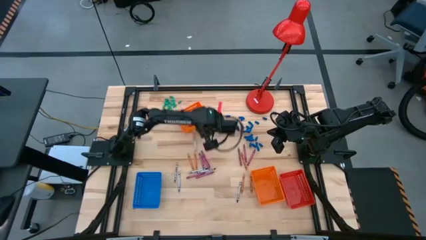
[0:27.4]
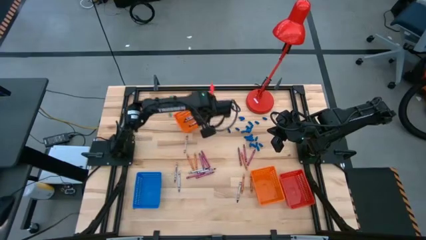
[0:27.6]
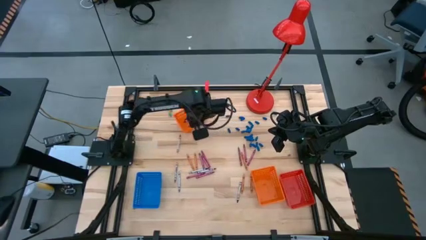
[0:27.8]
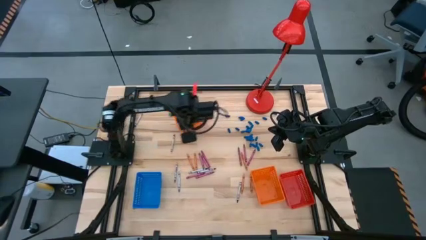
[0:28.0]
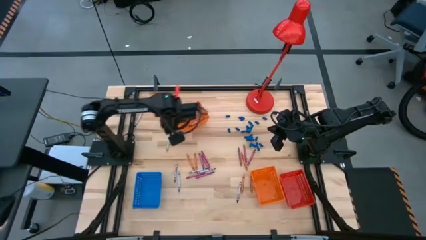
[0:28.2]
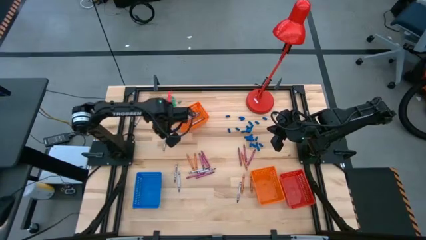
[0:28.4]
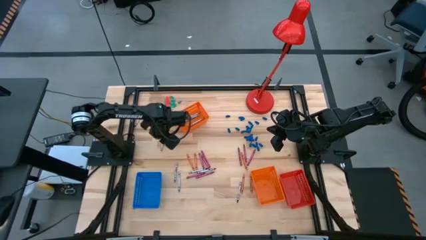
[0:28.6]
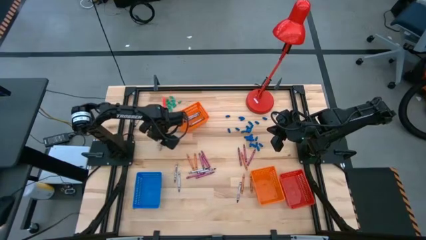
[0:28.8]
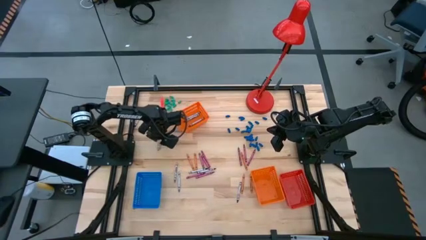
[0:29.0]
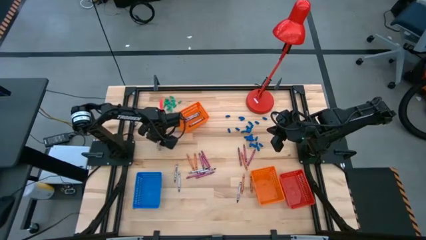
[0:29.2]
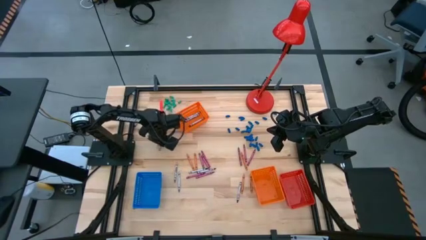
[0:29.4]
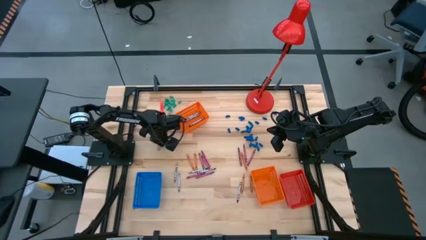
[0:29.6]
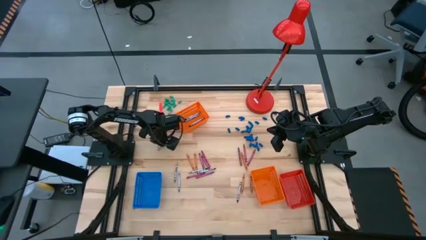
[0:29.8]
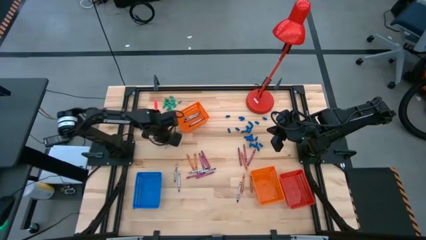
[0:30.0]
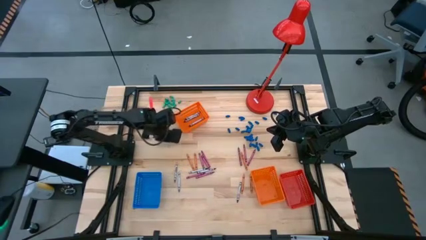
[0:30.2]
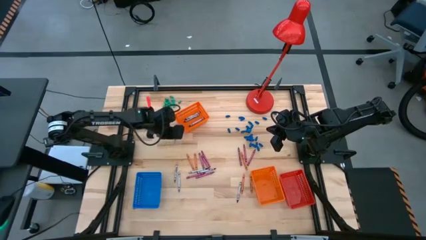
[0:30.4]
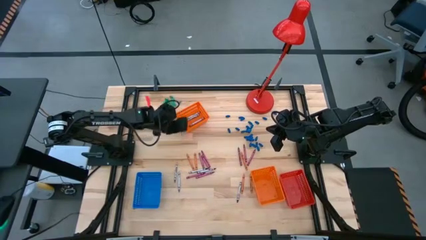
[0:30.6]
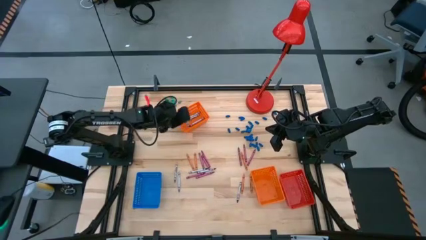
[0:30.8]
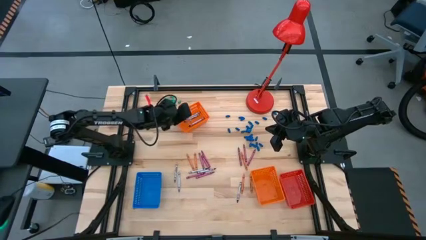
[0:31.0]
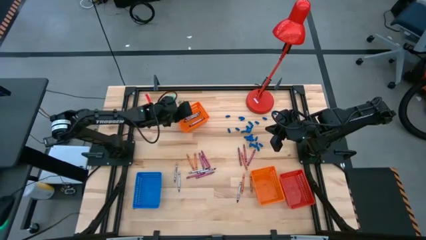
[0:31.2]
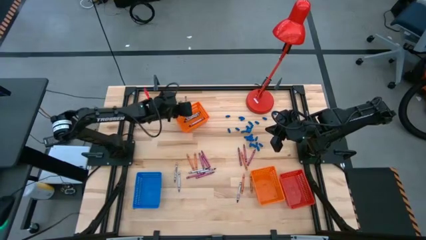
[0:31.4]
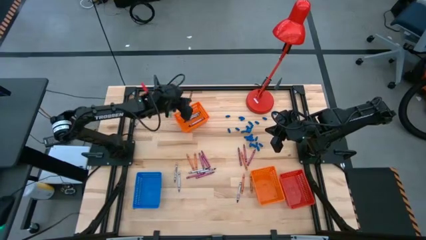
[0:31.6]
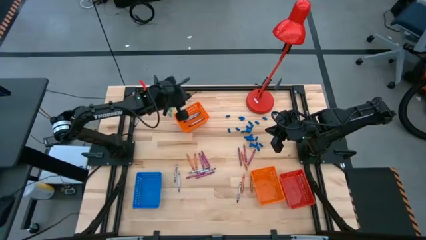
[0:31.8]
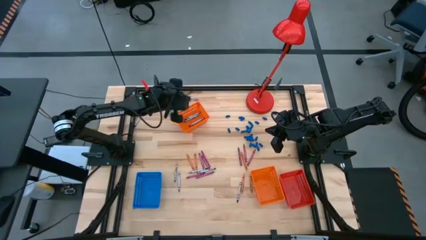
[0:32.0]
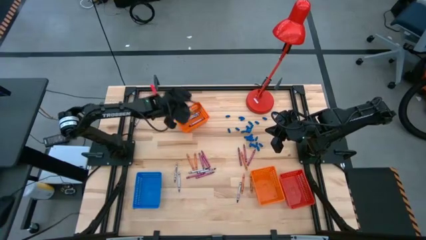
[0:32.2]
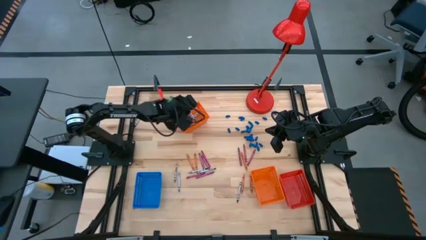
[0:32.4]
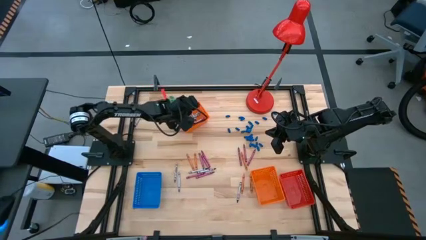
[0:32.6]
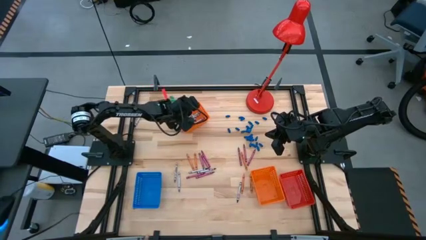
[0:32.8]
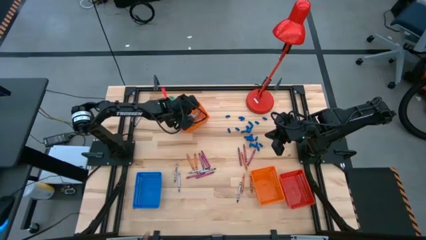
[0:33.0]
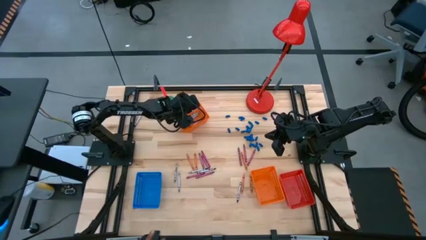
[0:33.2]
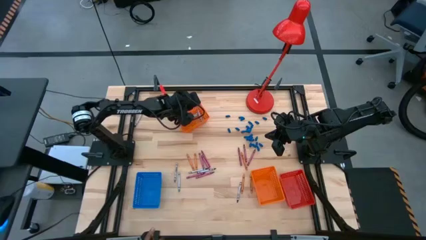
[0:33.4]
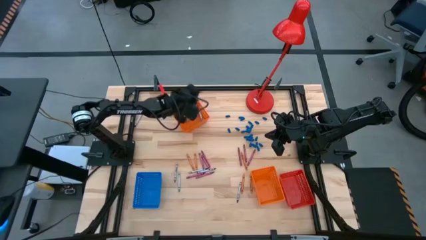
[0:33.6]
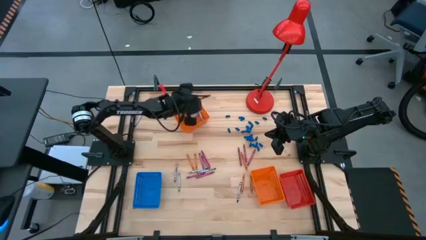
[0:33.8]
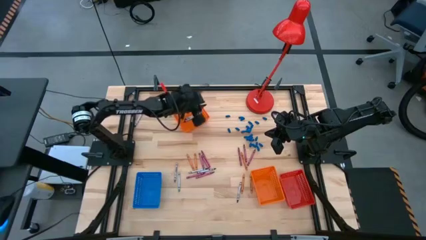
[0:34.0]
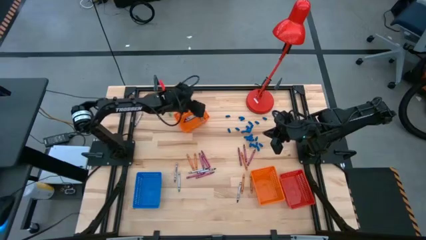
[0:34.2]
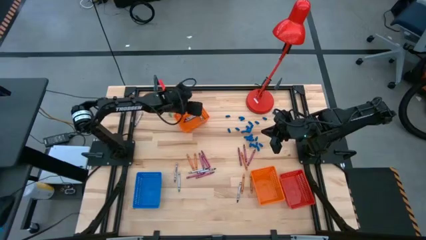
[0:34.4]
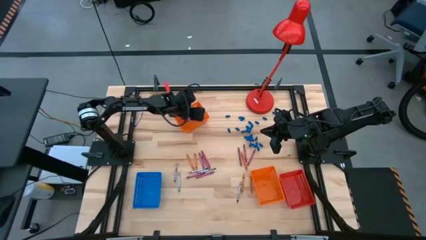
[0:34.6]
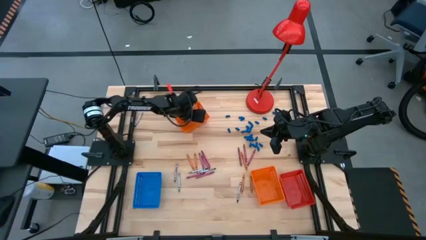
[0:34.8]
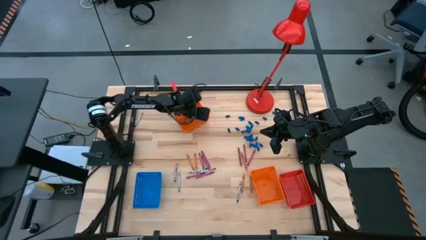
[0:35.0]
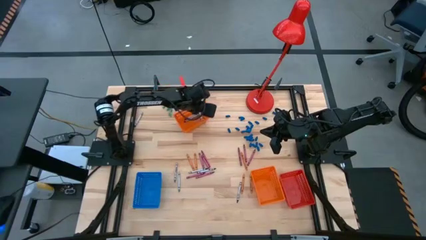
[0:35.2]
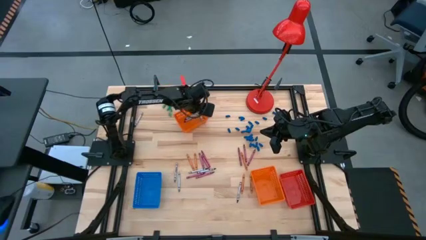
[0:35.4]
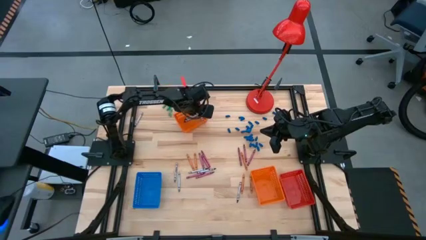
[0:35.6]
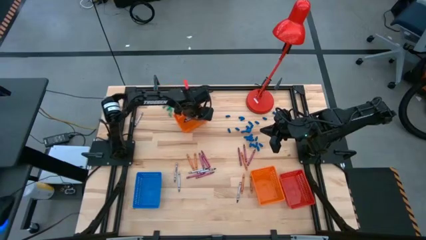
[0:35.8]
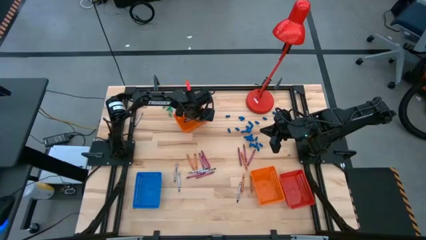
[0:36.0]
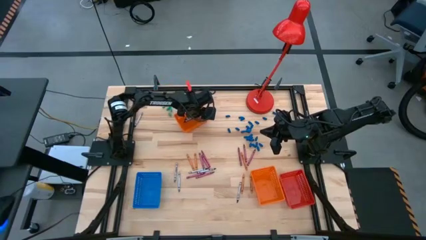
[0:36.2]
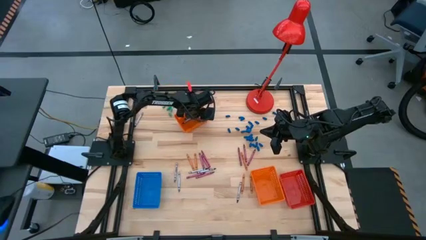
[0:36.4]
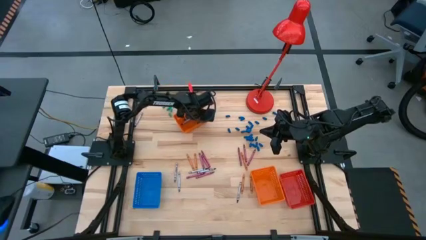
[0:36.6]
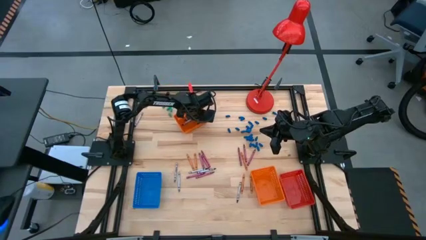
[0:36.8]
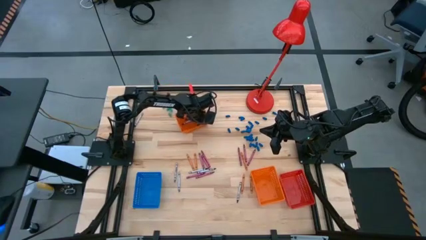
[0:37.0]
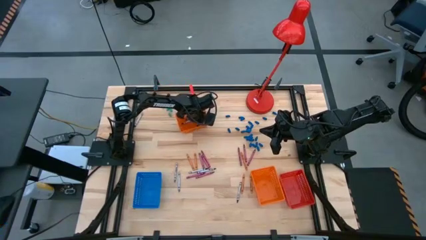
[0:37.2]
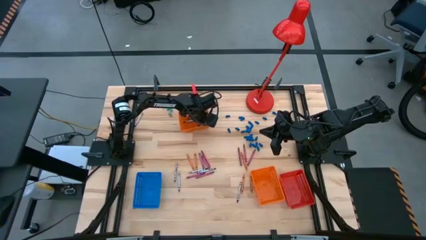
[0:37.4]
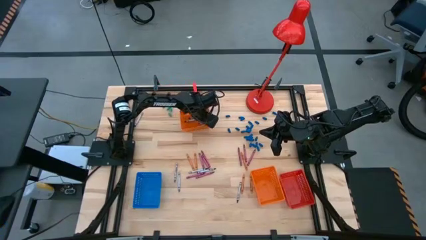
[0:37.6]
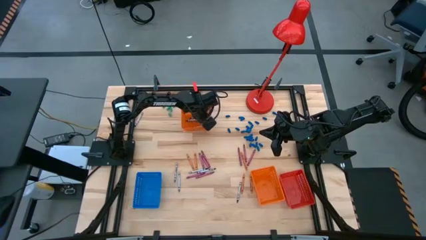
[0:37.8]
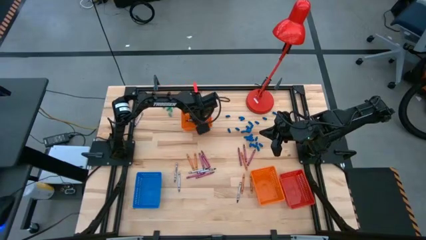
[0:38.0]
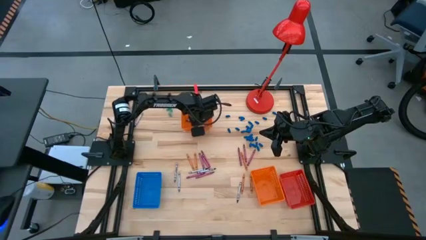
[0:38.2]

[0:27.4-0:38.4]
Task: Sort crayons
Put the black crayon into the top orange bin
